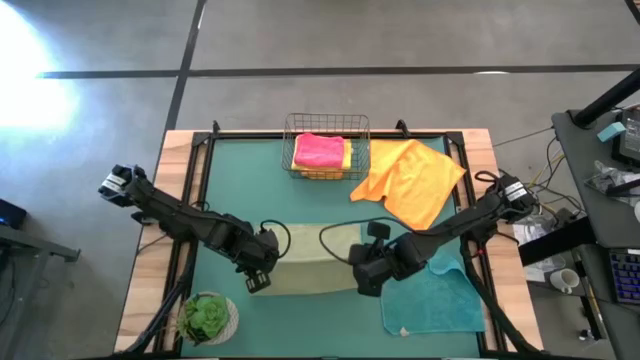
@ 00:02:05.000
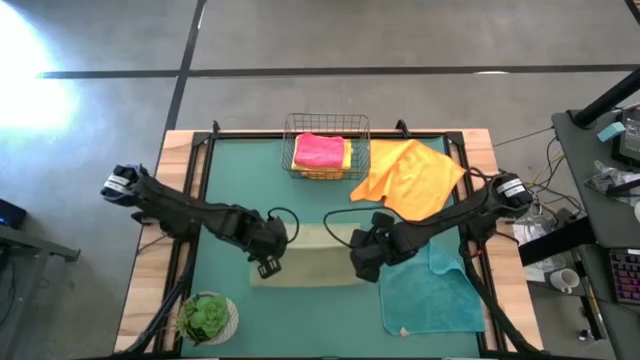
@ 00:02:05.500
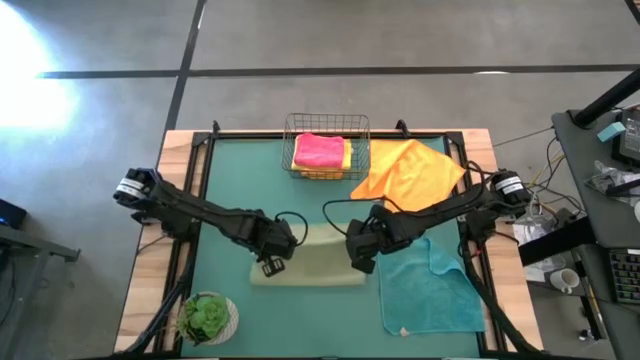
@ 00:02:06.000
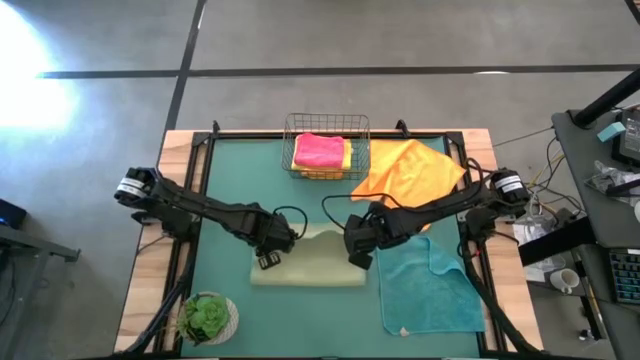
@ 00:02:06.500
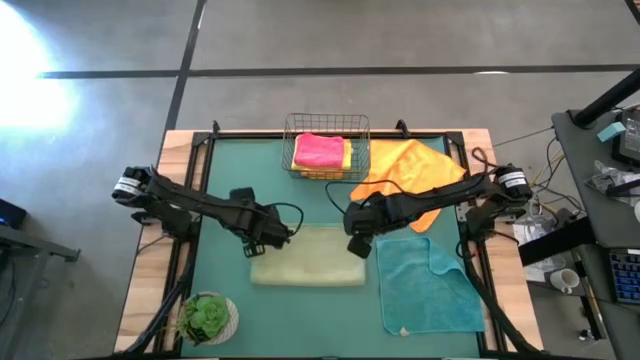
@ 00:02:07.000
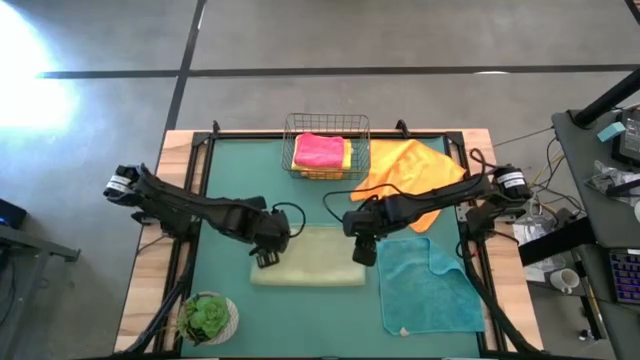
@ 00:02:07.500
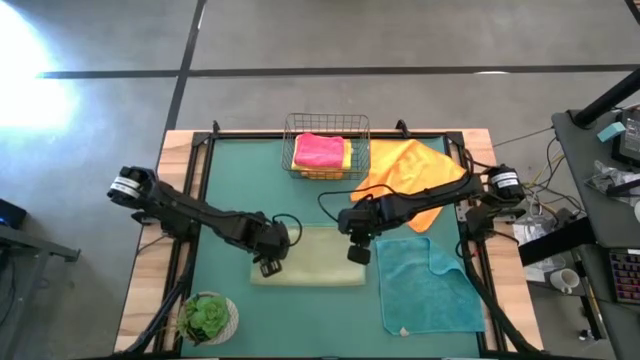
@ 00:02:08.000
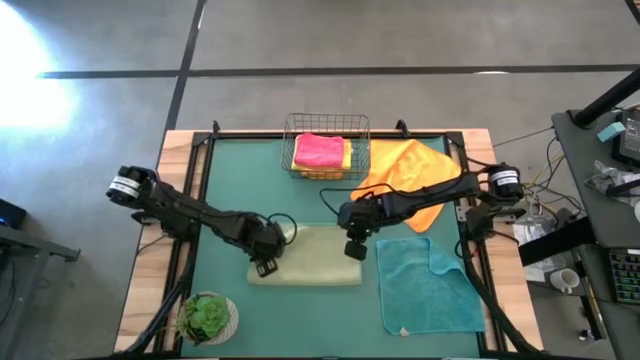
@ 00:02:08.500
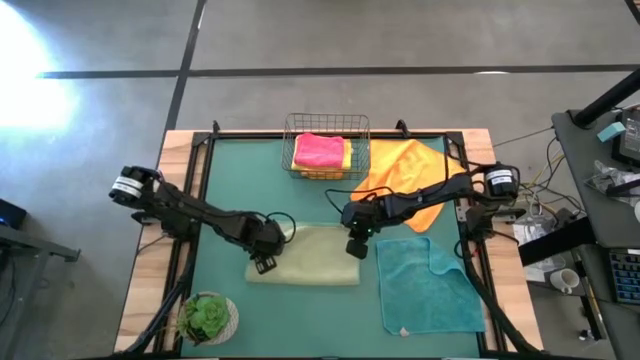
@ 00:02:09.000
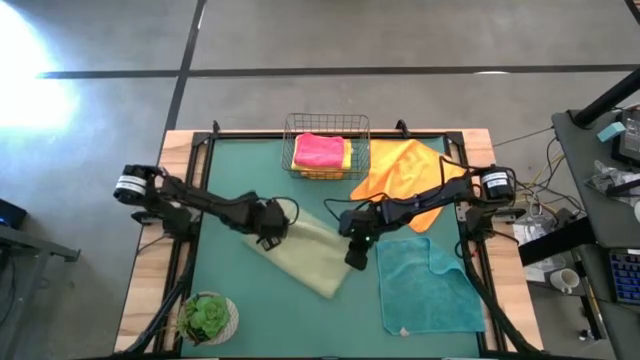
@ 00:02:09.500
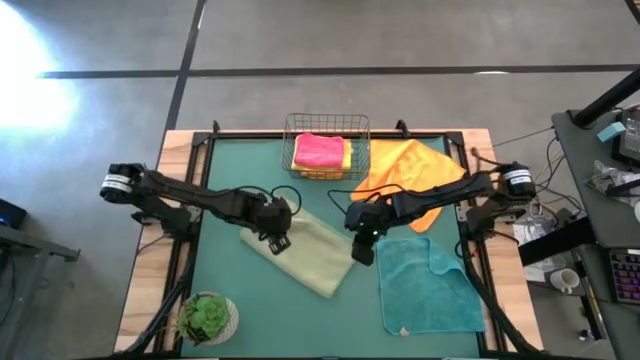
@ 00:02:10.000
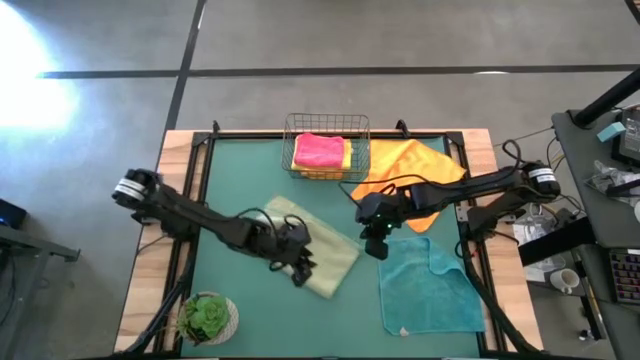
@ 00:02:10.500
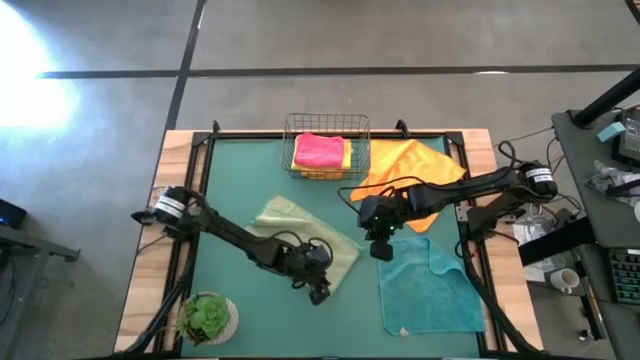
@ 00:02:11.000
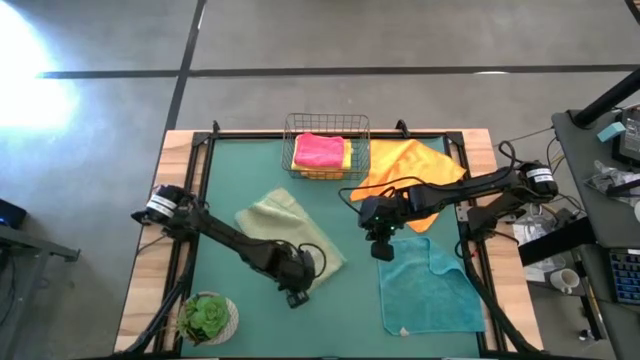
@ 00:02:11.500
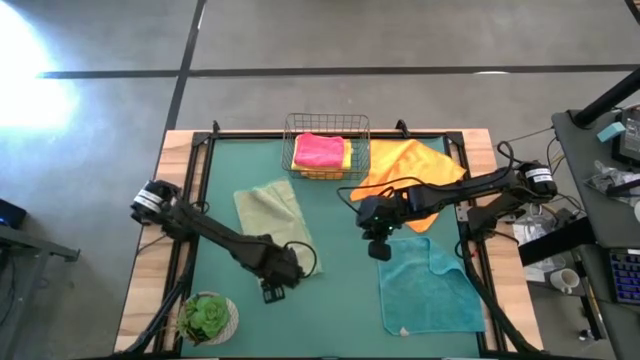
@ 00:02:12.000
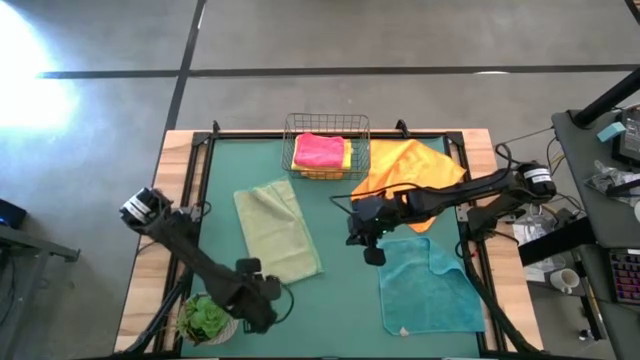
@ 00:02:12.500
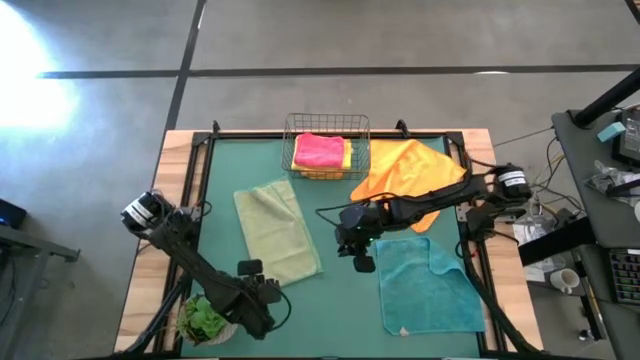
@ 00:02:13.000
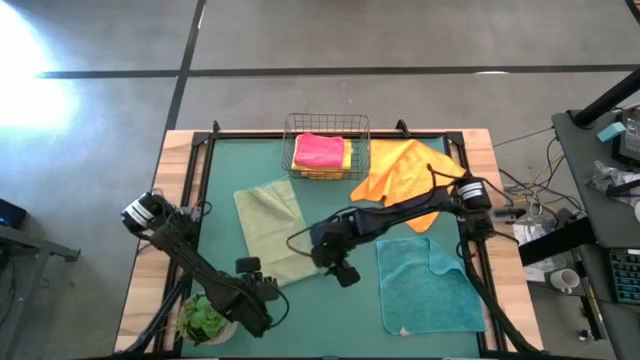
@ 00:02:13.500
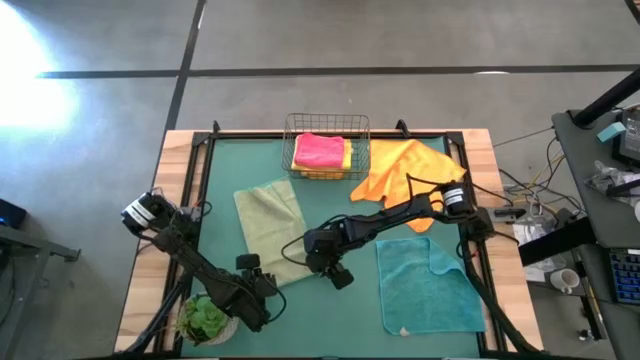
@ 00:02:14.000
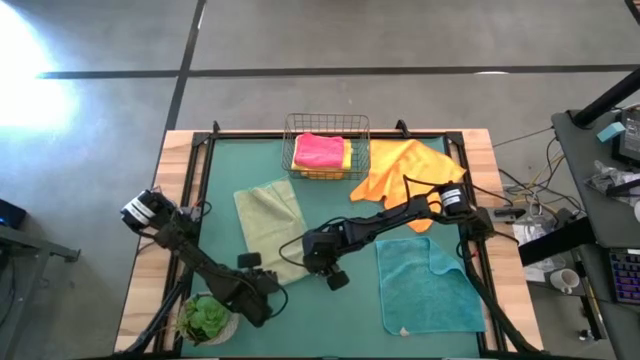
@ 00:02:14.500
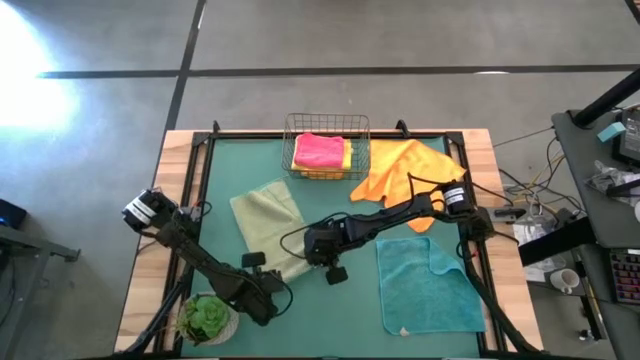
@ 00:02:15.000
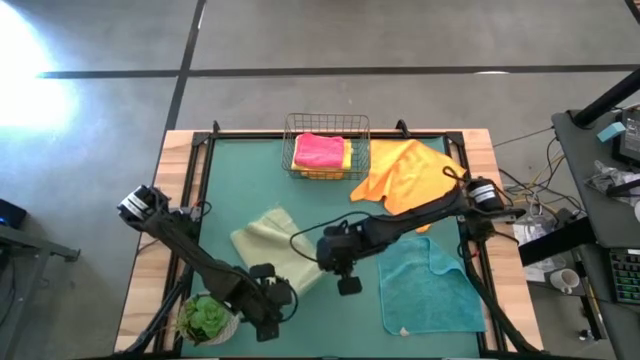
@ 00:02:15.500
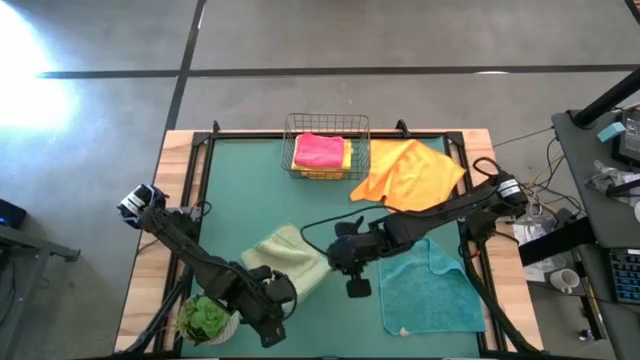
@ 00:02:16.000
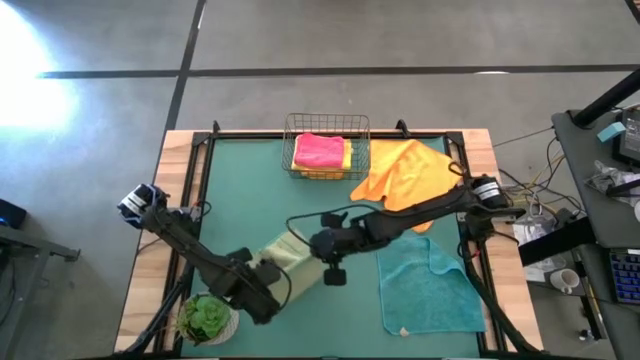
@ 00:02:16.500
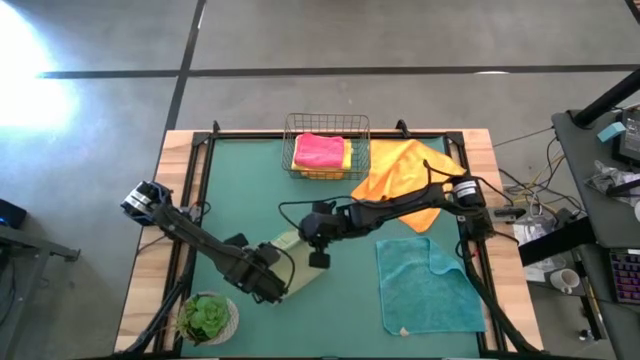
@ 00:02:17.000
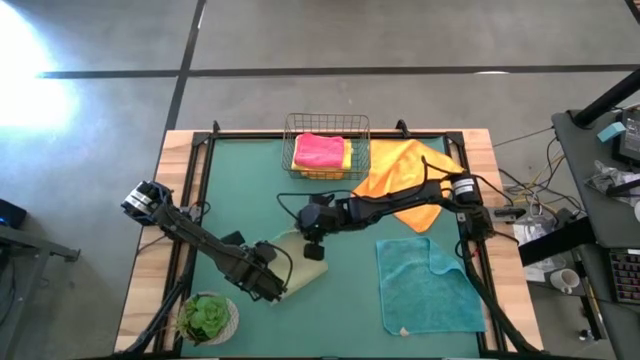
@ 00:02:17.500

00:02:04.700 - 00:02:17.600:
Task: Fold microfiber towels
Fold the green microfiber towel

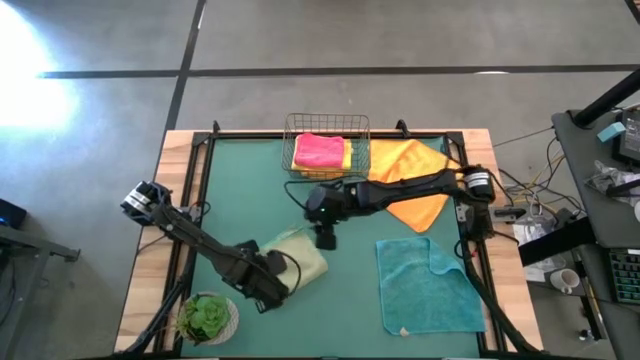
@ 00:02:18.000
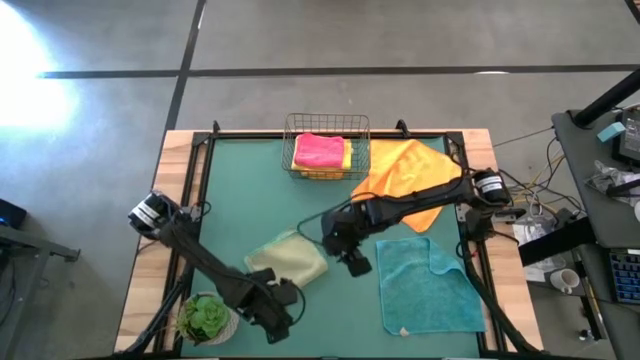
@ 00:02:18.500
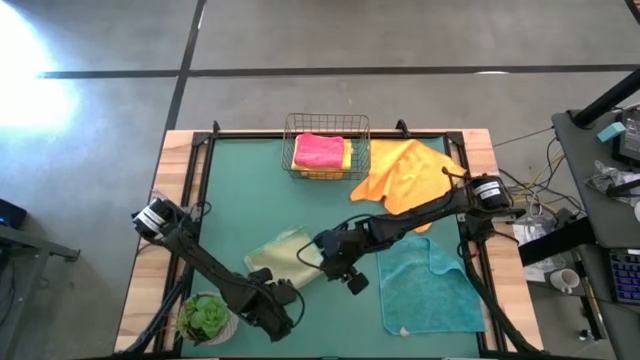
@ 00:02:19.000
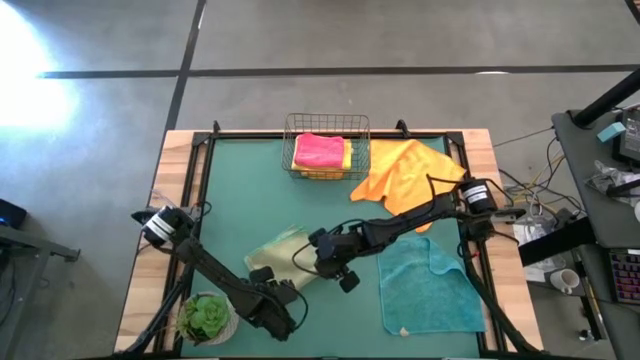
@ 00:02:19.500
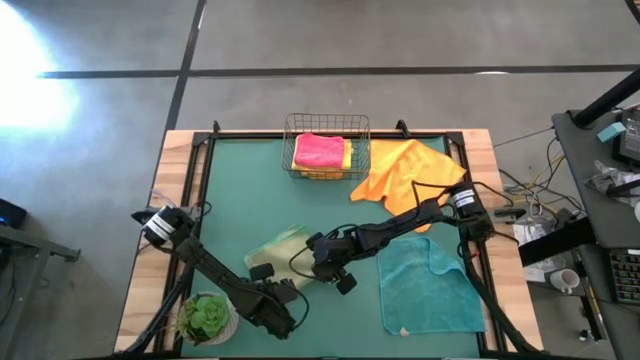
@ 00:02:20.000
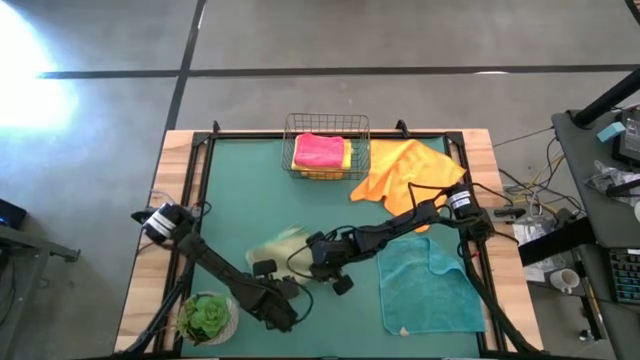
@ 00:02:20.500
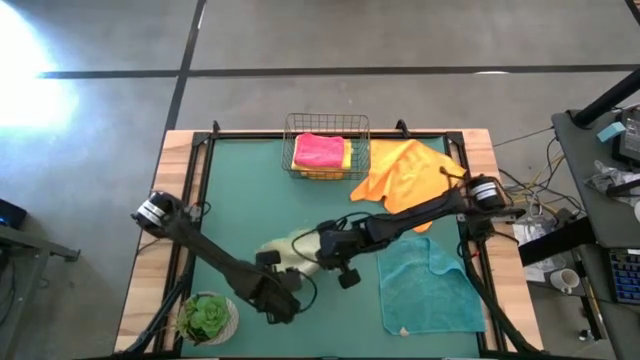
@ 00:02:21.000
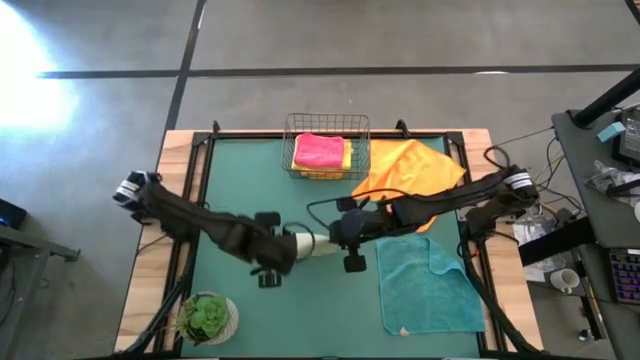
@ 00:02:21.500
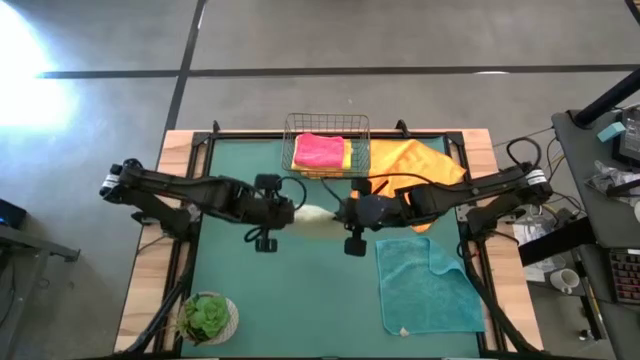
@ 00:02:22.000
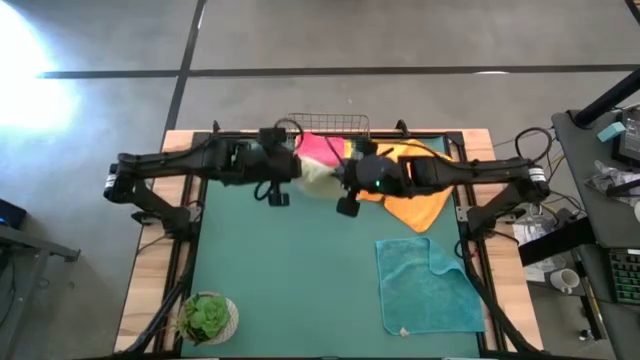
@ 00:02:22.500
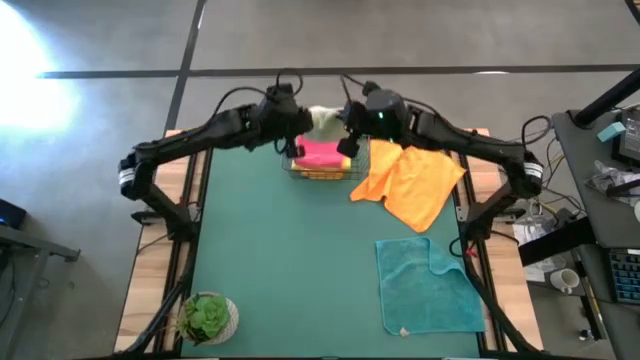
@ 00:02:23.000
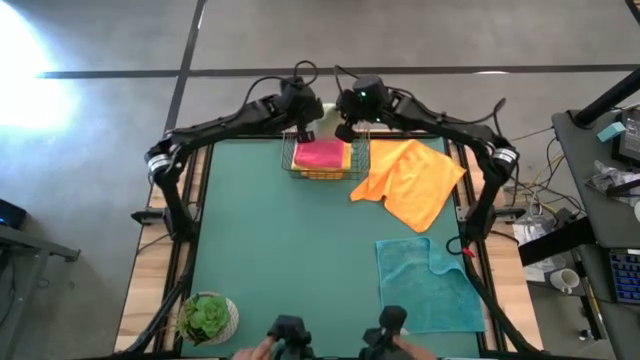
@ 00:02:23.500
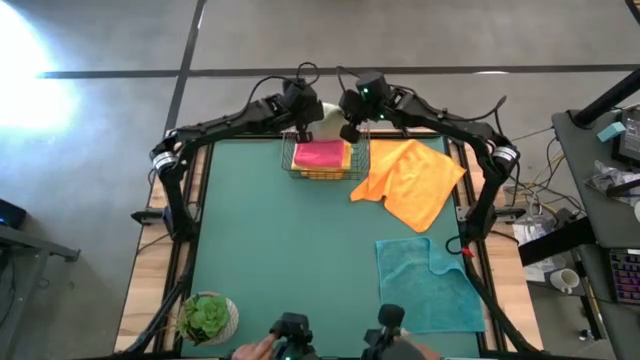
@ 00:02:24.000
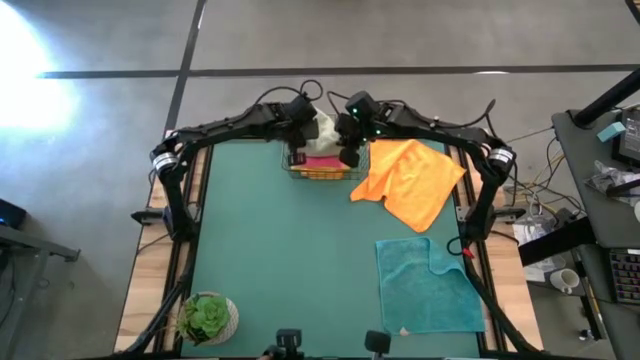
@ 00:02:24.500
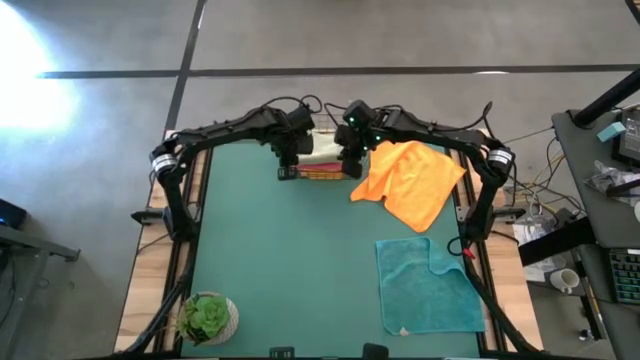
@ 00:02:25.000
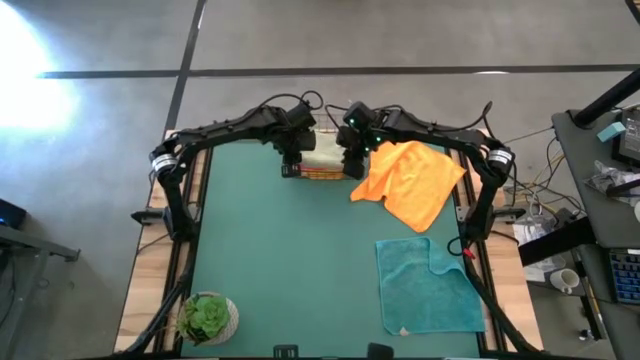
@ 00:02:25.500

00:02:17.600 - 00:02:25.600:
Put the green microfiber towel into the wire basket

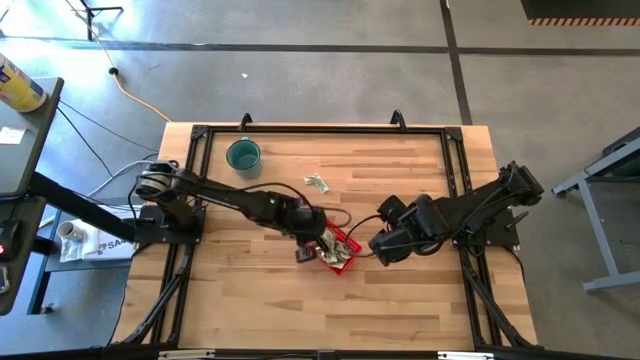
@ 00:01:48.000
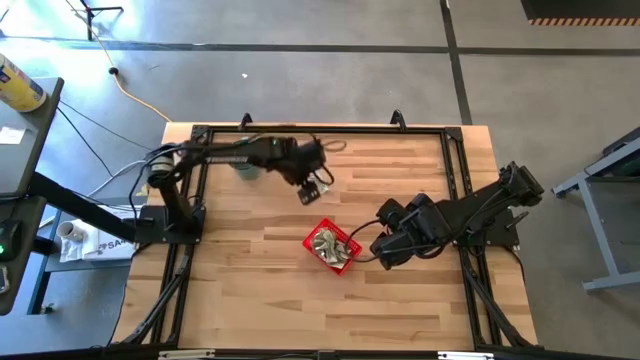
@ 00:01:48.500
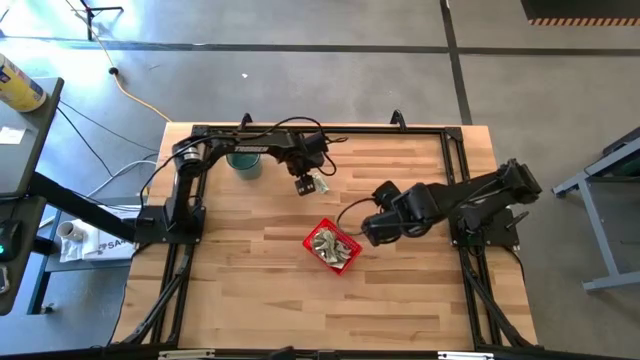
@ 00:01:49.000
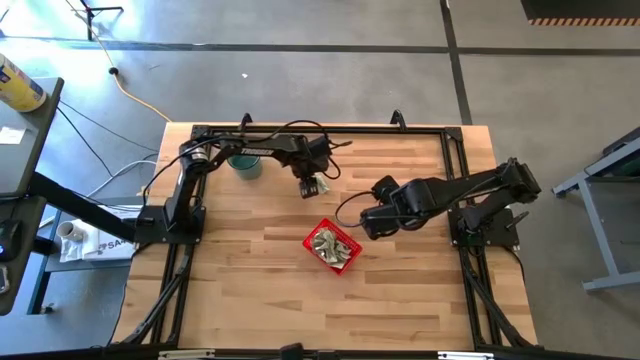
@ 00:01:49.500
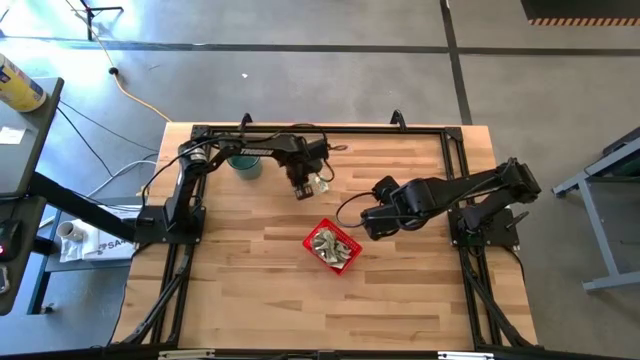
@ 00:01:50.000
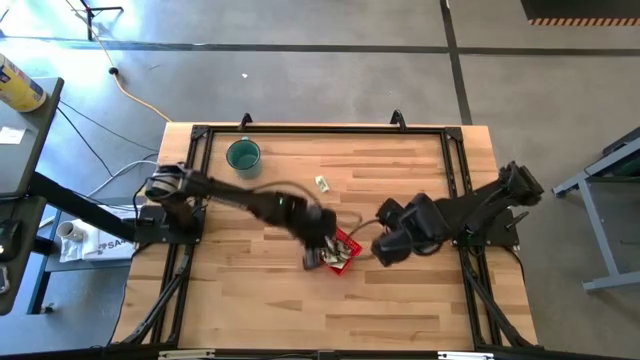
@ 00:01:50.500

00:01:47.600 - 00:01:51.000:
Task: Pick and place Stevia / Truvia into bins
Put the top light green stevia packet into the bin
